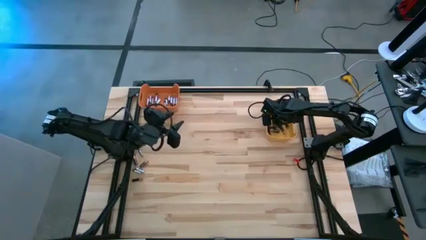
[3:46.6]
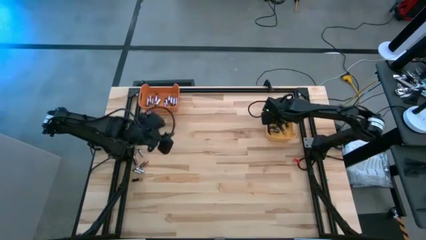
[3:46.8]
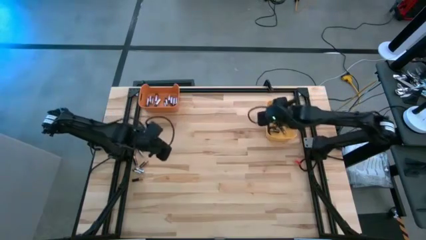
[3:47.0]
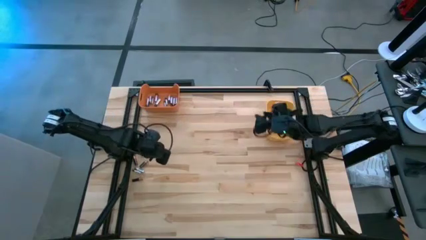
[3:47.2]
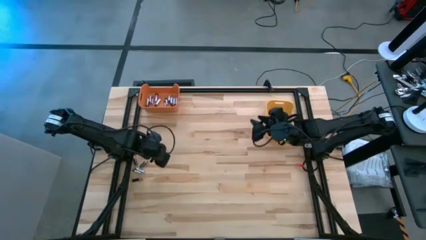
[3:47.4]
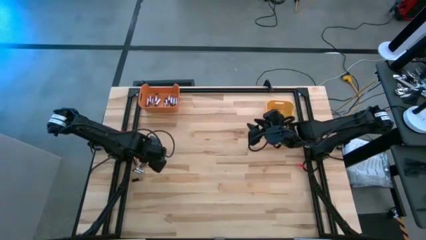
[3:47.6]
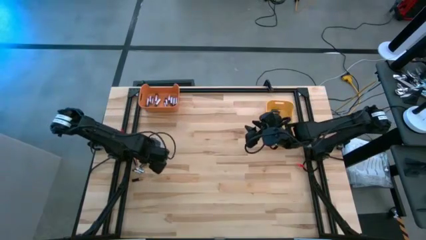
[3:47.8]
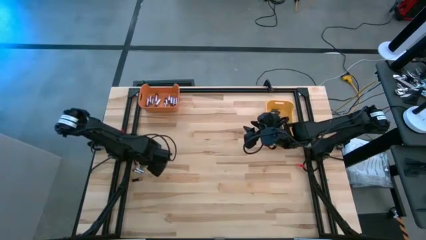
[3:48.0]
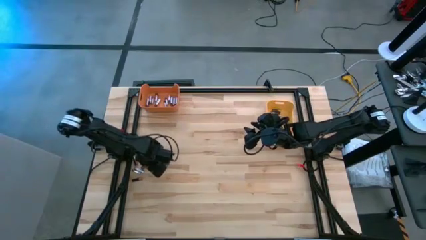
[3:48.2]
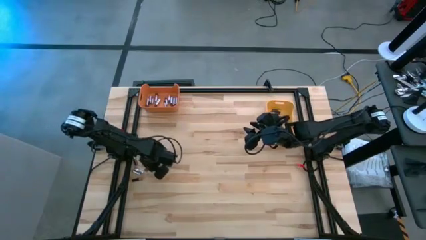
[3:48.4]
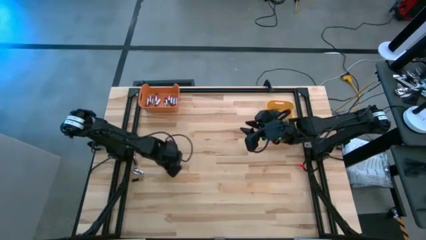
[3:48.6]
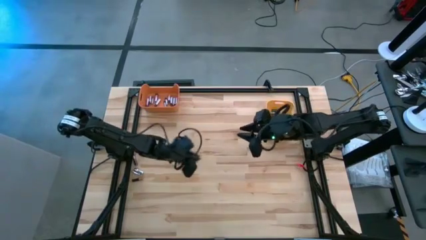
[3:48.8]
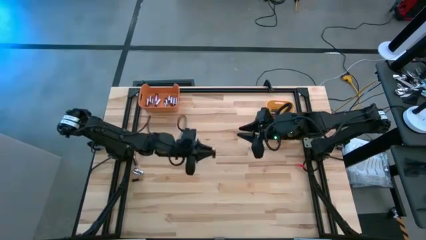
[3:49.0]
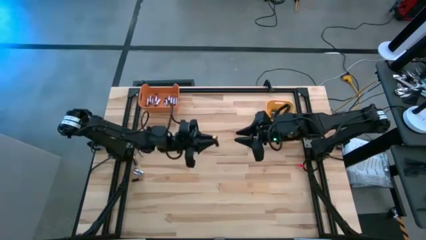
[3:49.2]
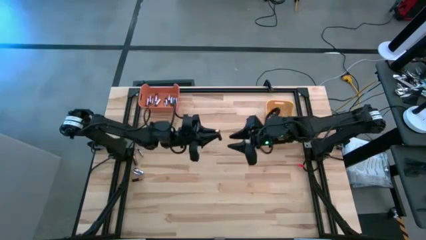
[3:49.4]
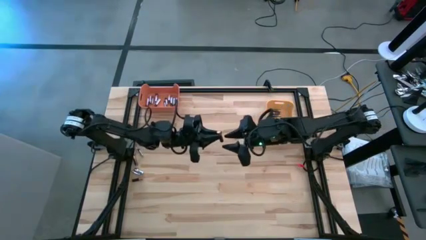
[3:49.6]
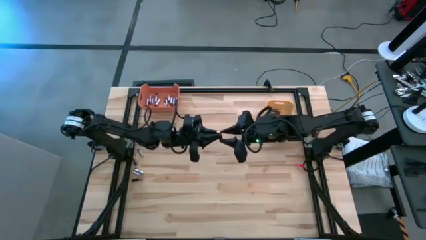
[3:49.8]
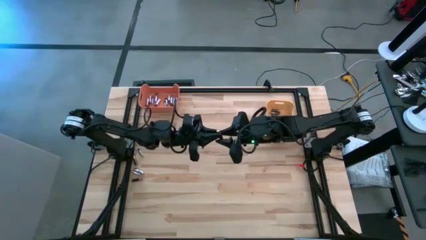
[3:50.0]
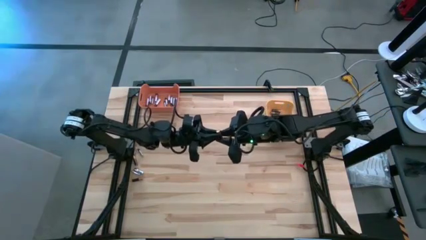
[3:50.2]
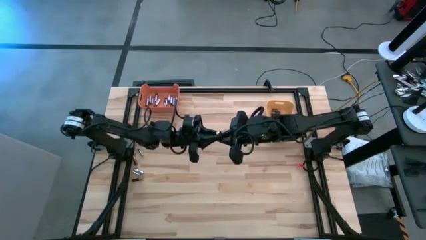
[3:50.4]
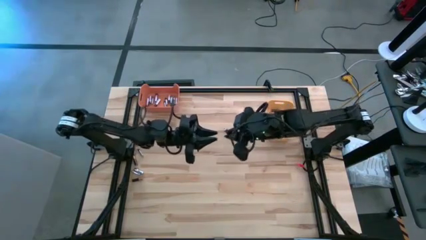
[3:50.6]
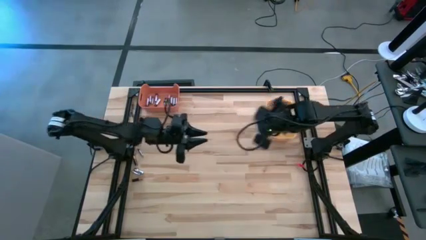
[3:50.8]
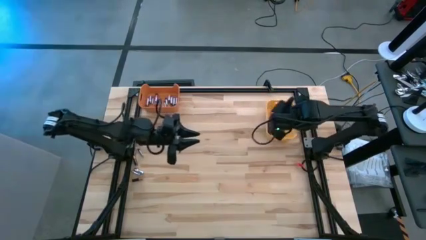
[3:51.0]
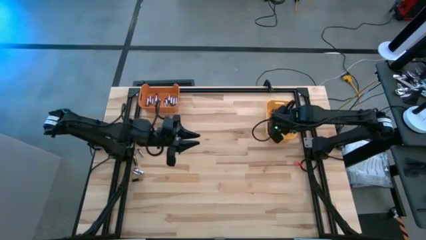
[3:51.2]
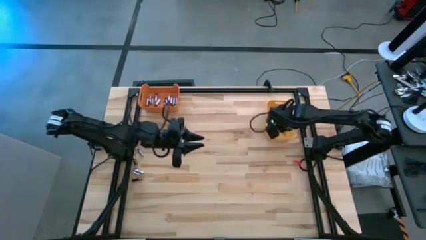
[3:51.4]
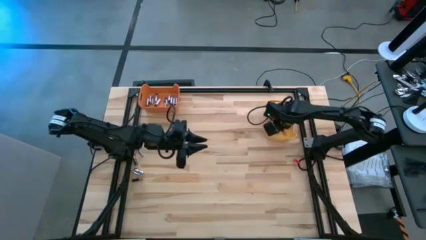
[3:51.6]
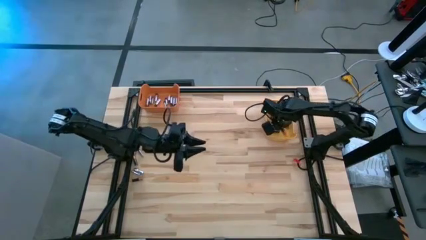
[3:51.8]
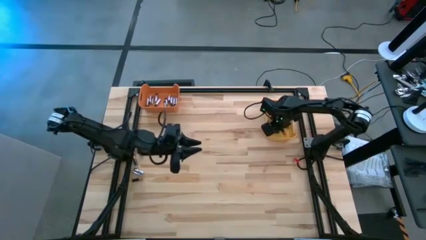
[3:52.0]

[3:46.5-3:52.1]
Task: Sort batteries
Put the black battery into the yellow bin

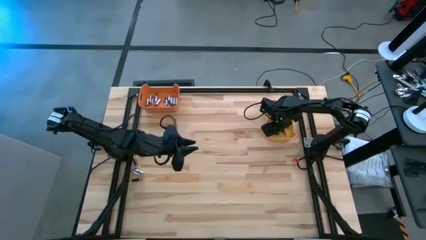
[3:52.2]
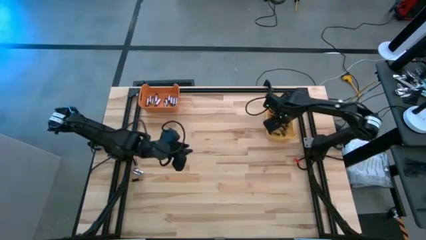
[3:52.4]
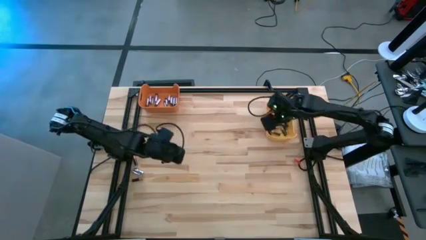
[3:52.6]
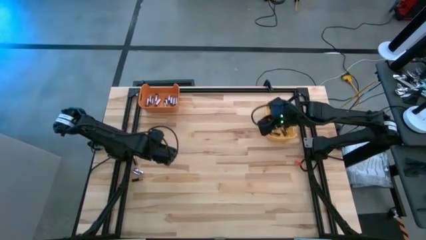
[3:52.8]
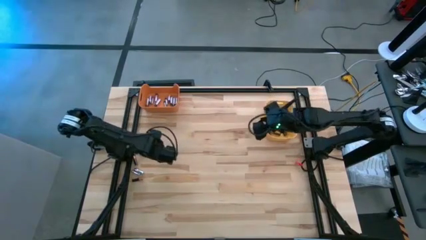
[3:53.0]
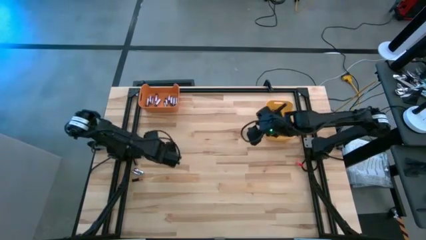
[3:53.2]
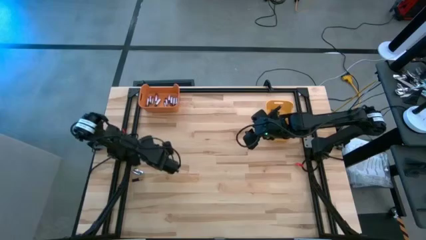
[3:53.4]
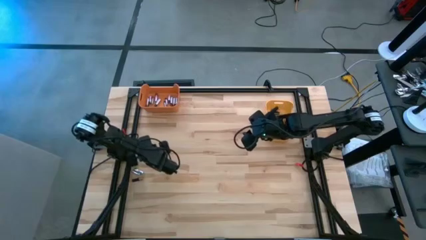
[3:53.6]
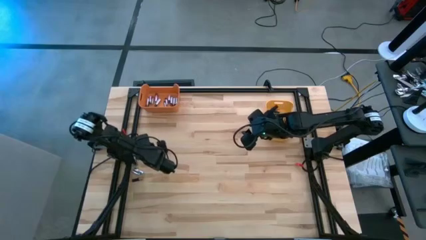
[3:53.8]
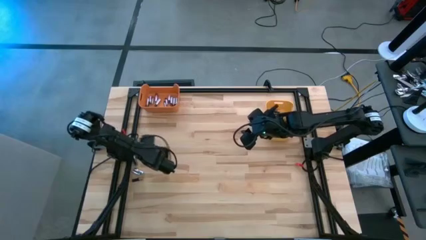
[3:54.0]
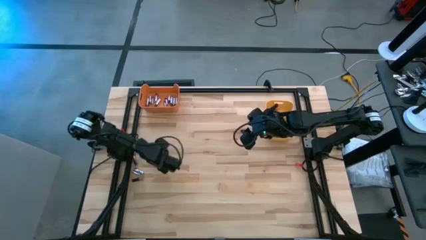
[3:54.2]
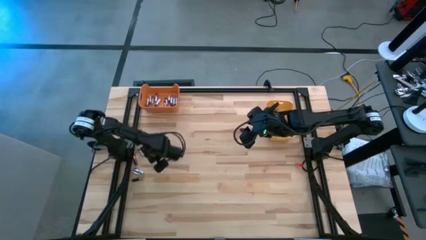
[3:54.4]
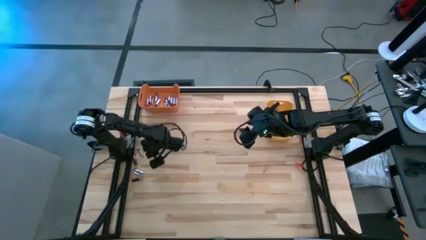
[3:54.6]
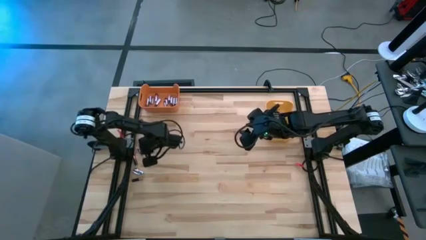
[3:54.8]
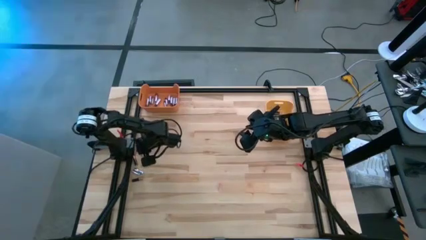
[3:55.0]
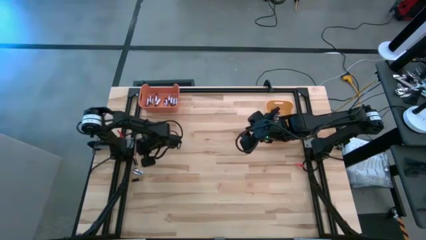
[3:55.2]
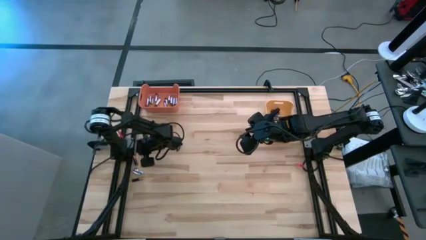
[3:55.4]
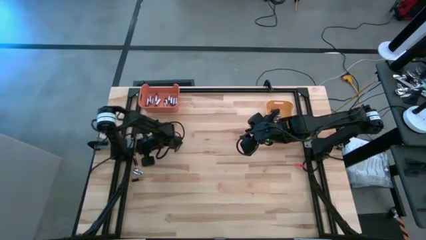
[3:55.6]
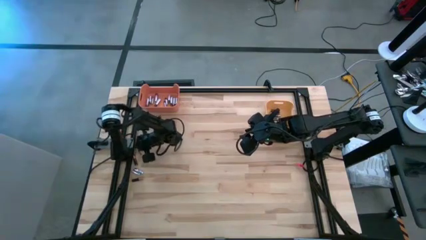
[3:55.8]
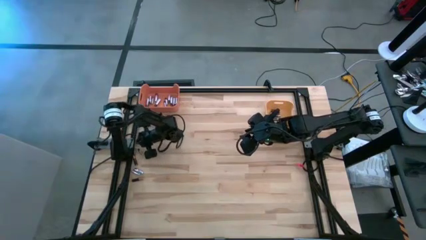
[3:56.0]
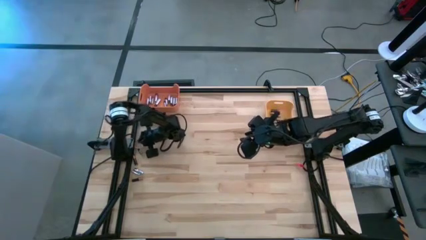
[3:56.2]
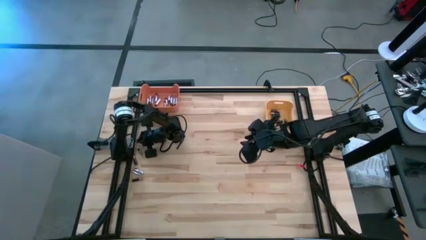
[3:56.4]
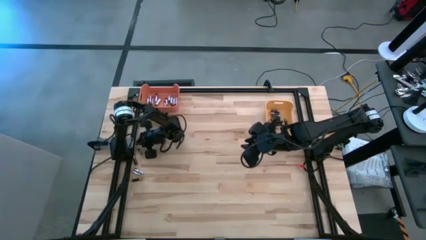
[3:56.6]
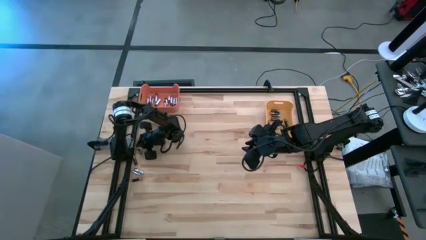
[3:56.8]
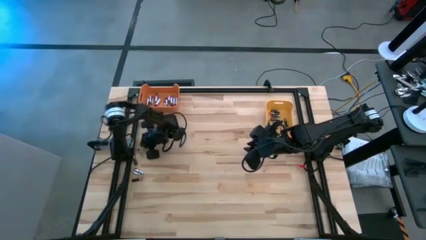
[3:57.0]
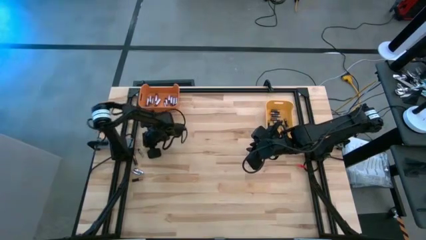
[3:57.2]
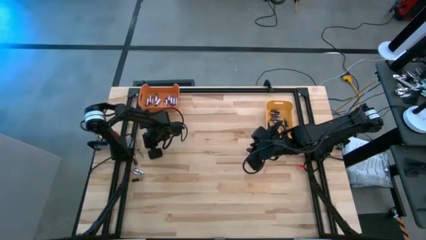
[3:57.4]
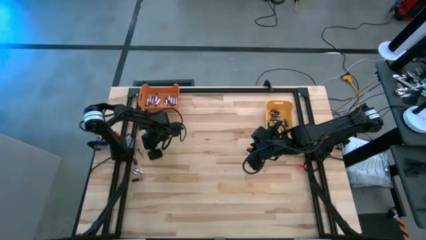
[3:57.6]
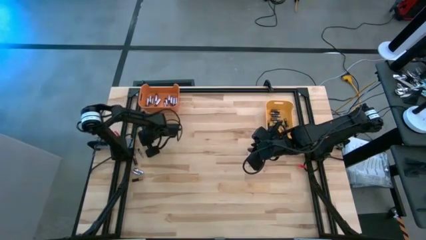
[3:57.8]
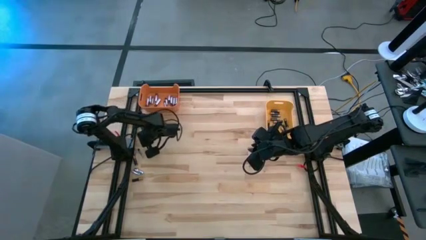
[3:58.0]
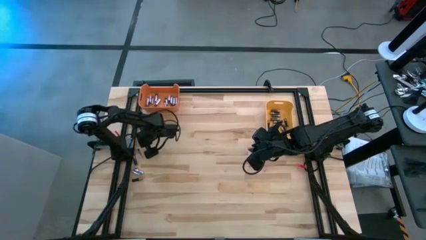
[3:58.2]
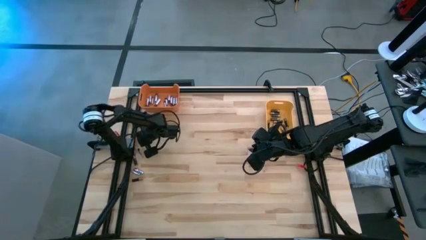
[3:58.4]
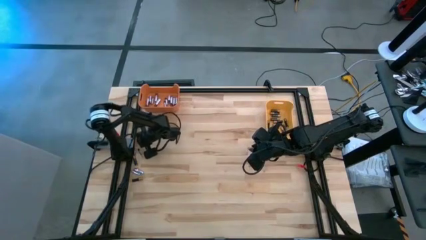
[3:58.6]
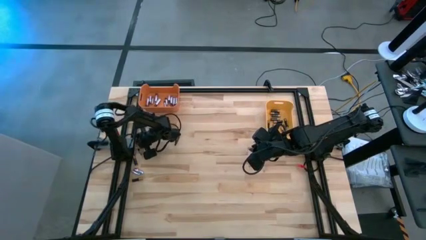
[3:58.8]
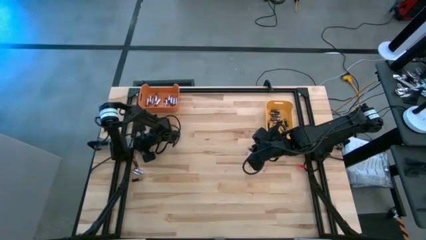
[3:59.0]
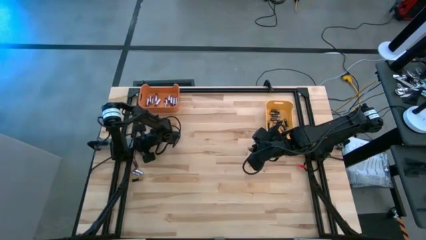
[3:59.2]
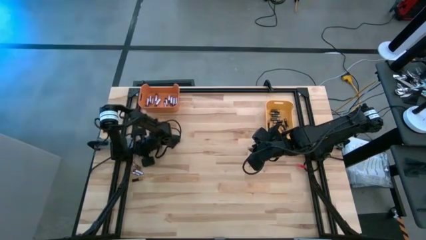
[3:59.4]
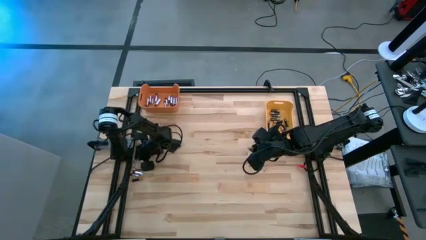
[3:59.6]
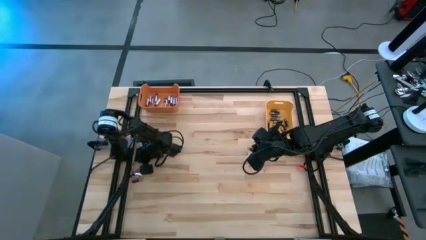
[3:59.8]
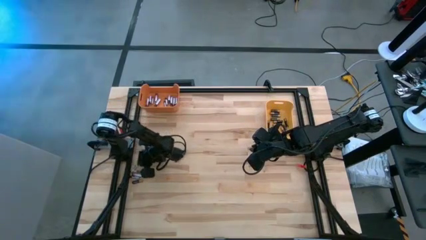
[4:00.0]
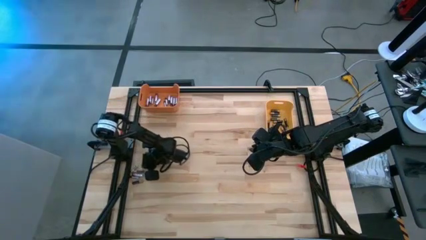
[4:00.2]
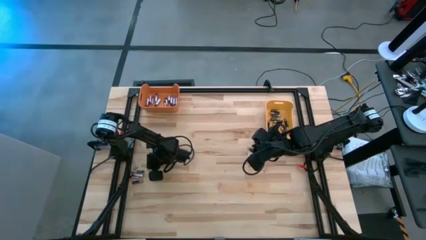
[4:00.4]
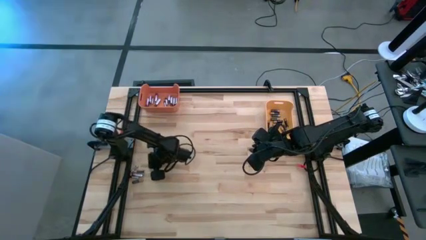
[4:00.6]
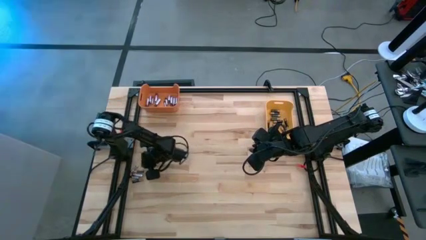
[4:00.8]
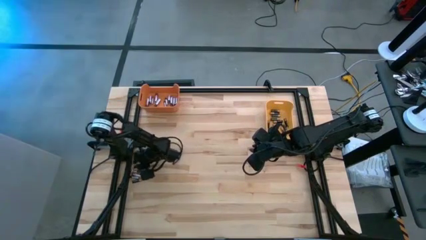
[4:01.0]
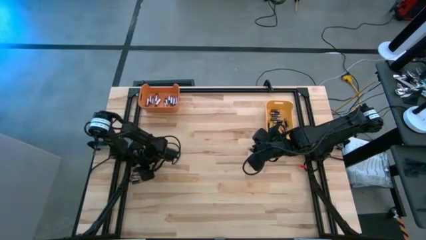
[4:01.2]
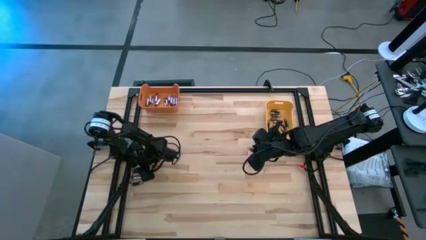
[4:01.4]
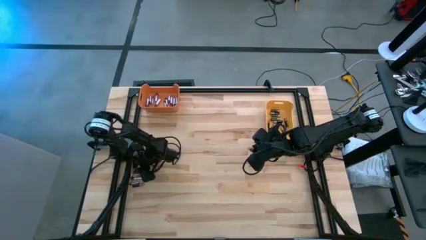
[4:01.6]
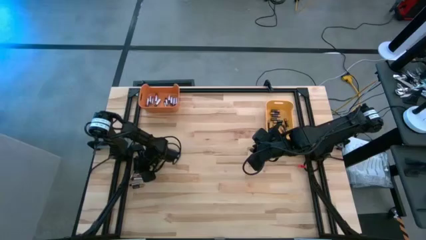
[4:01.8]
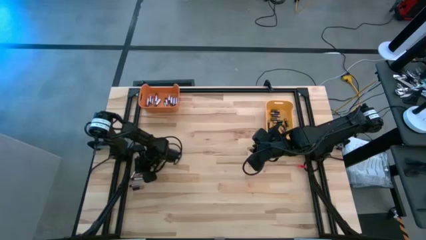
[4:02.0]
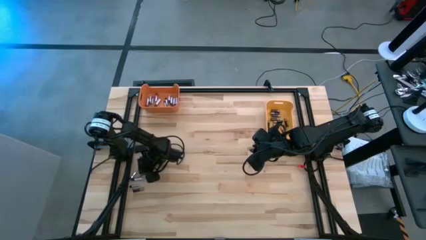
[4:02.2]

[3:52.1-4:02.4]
Put the silver battery into the orange bin
